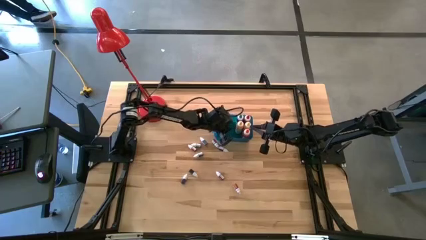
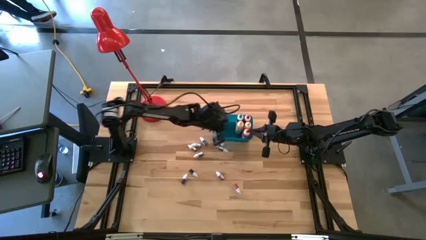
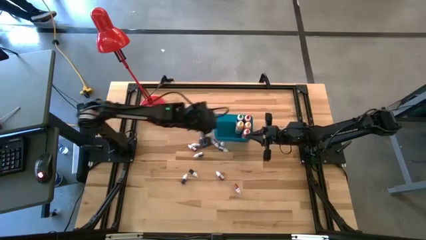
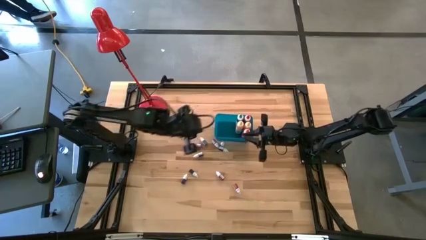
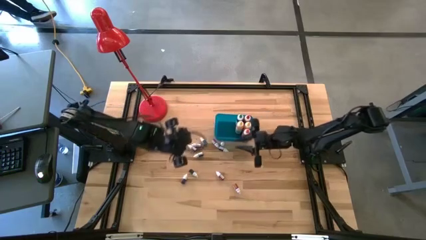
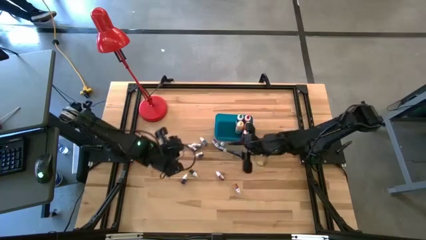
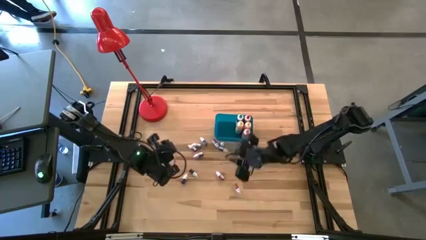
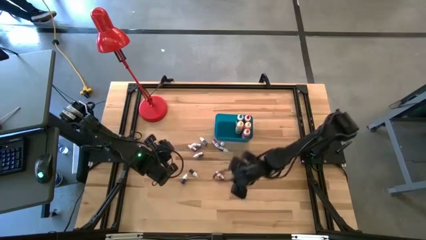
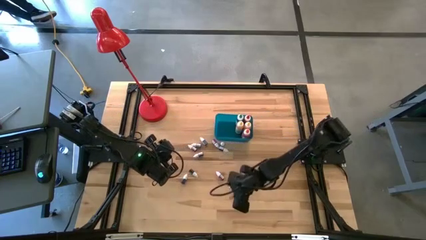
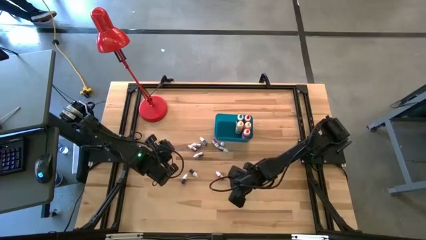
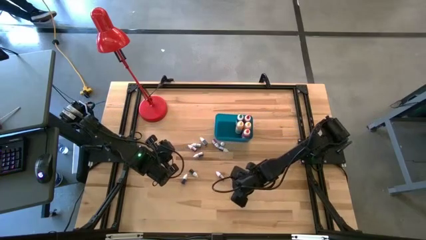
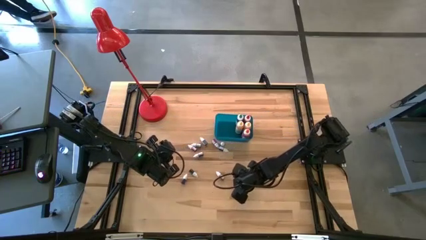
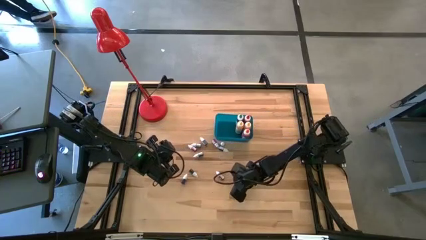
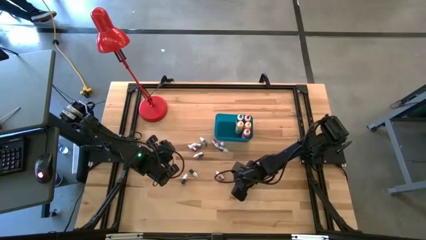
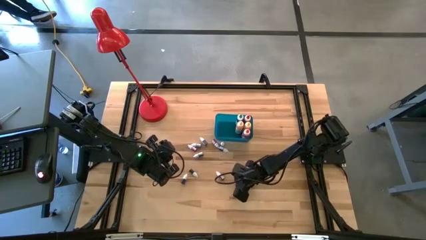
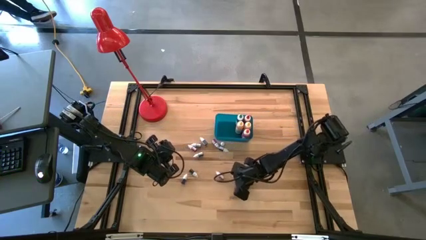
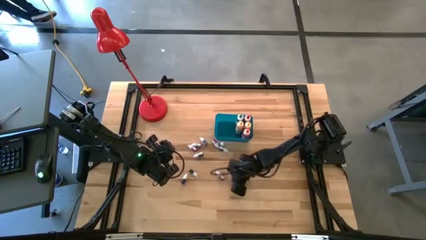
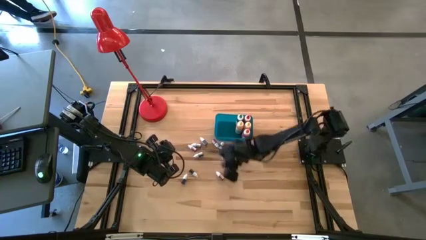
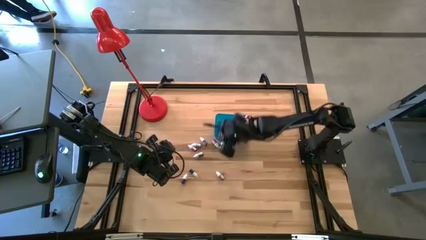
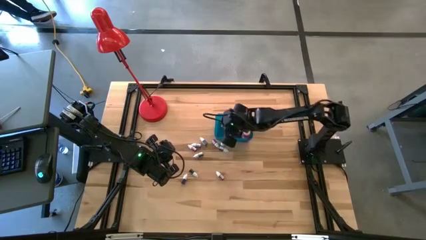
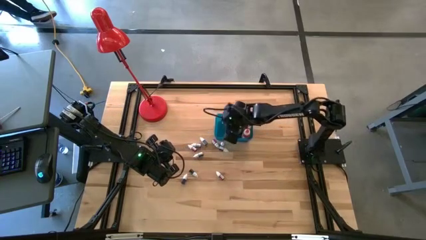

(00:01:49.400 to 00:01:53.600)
Task: Pick & Place food coloring
Put the small orange food coloring bottle into the blue bin

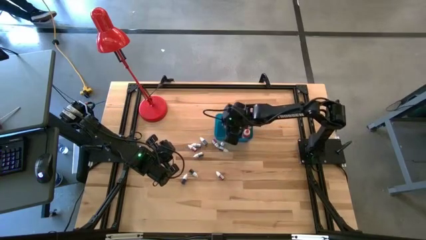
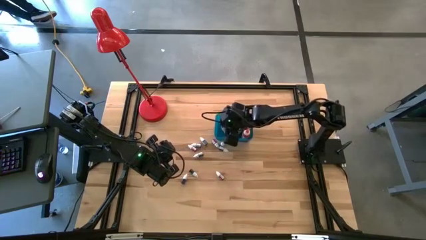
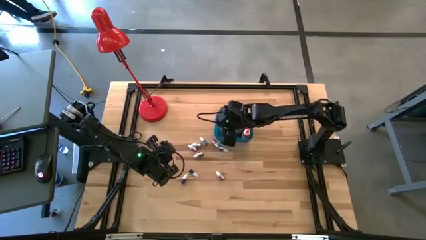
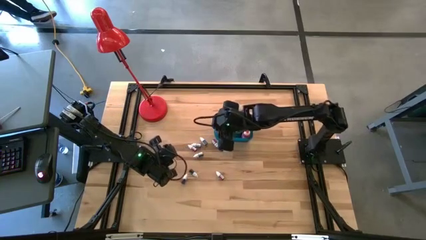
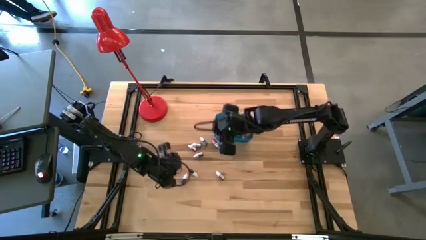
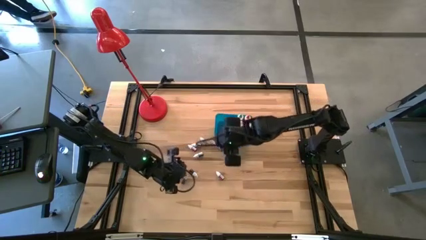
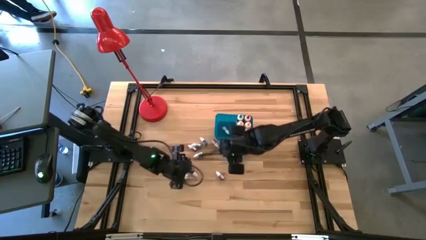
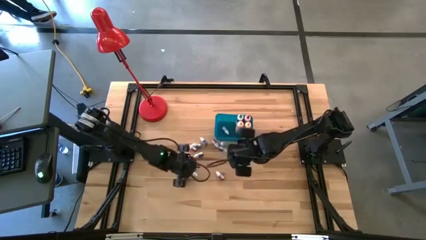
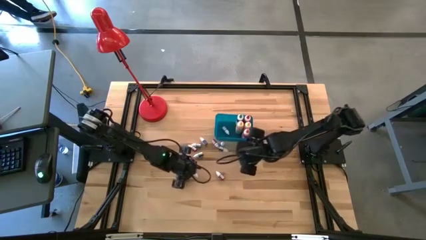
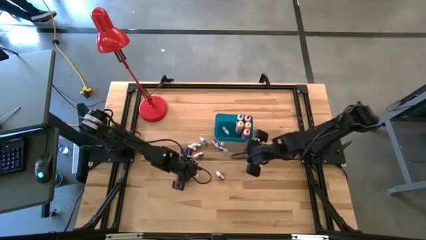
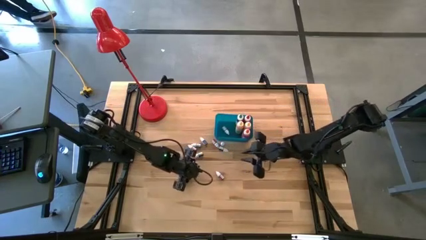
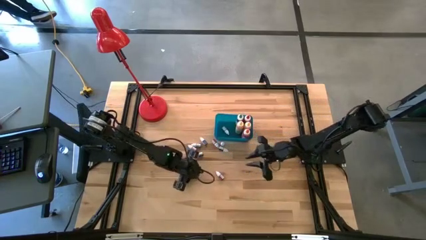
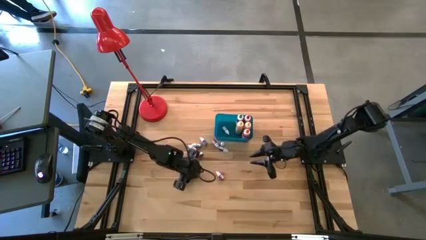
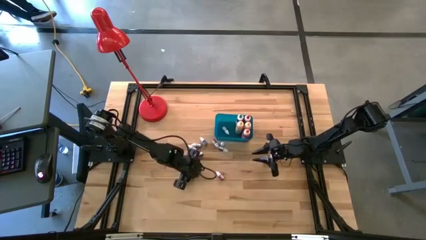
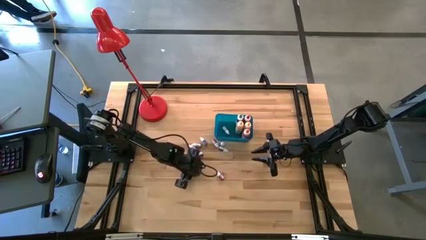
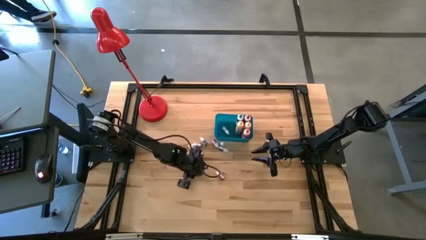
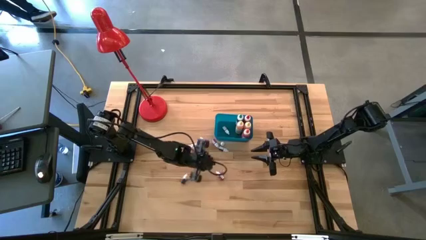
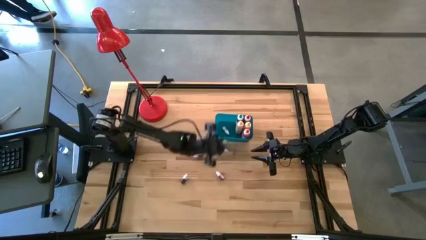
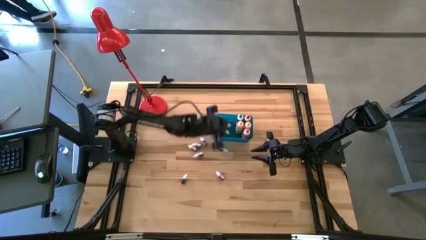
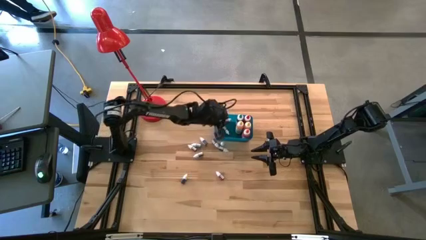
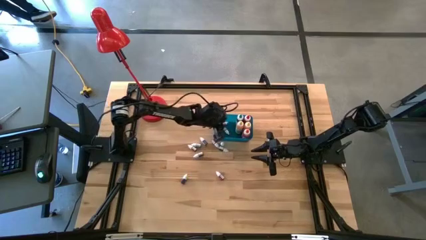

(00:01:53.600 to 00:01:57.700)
Put the bottom small green food coloring bottle into the blue bin

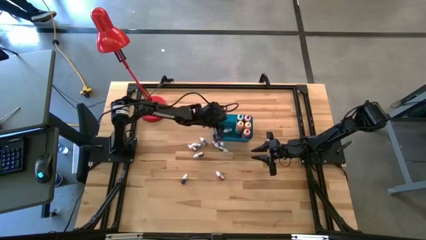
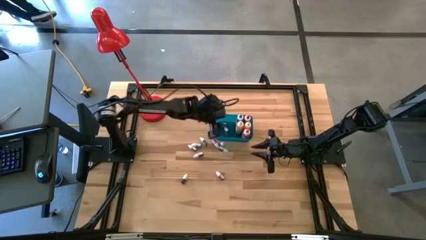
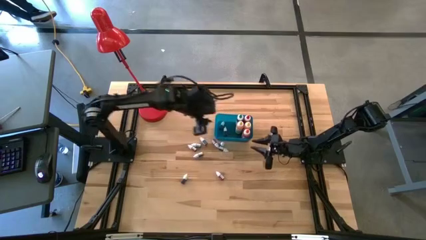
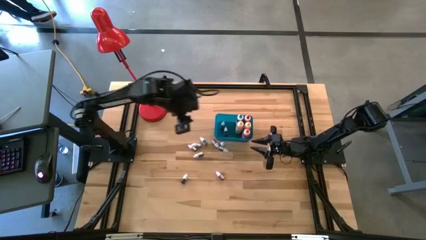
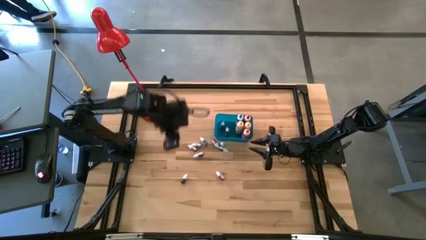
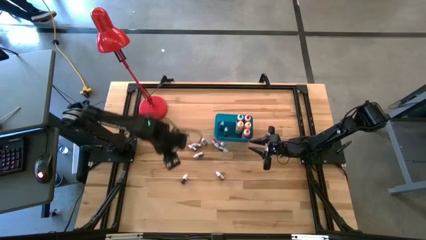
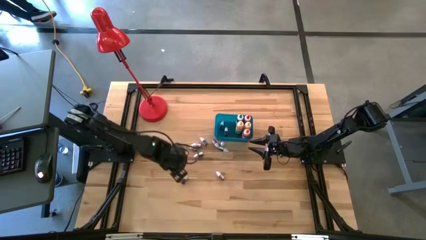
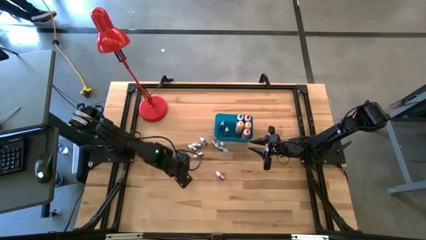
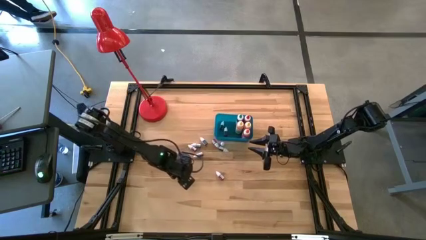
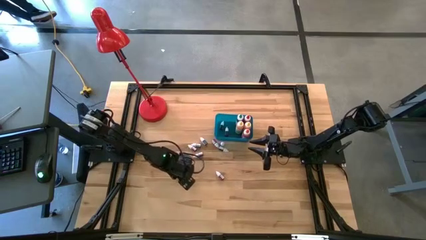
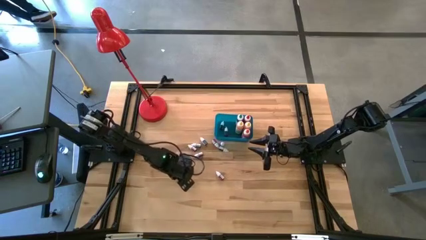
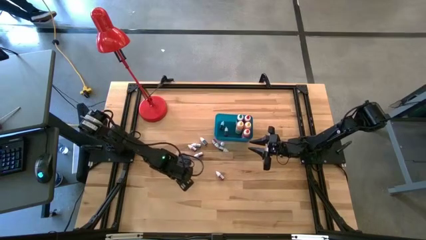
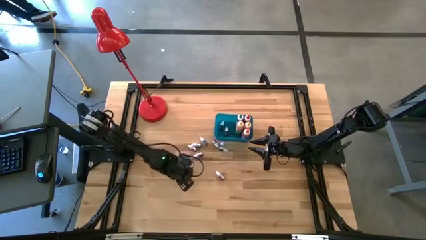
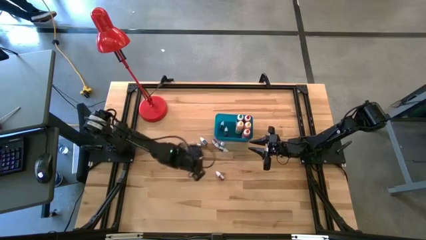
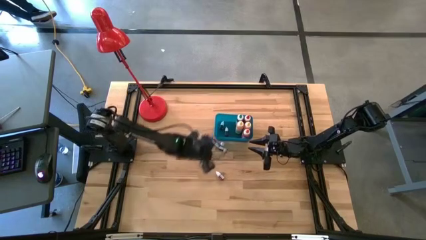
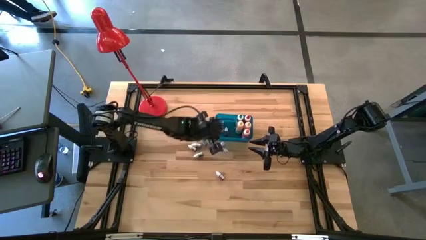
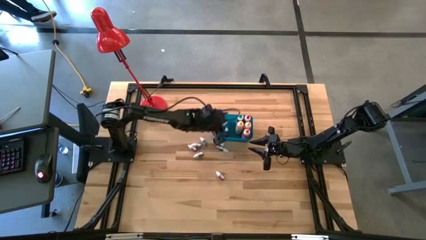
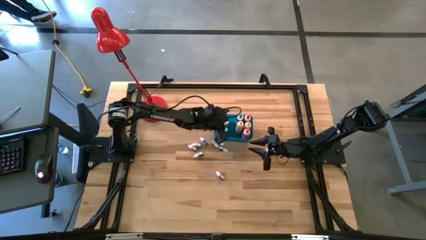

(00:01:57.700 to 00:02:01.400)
Put the bottom small black food coloring bottle into the blue bin

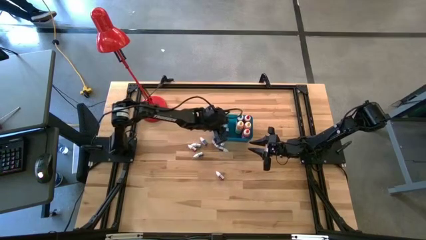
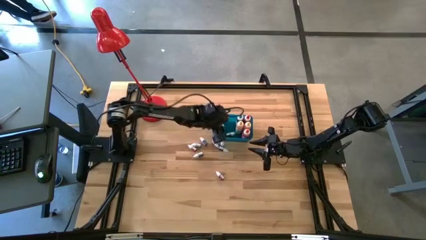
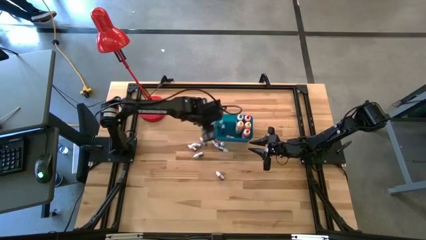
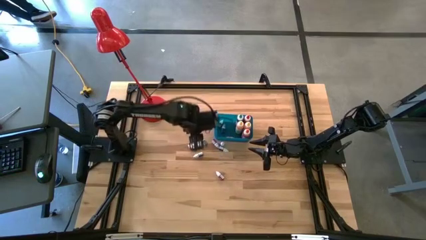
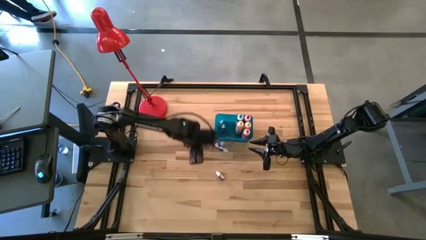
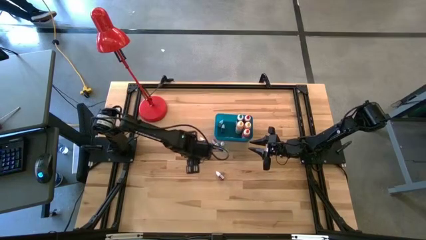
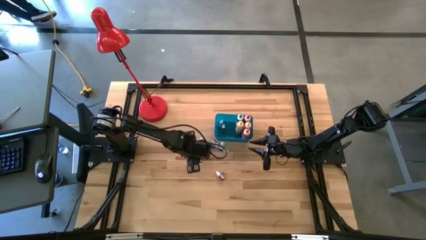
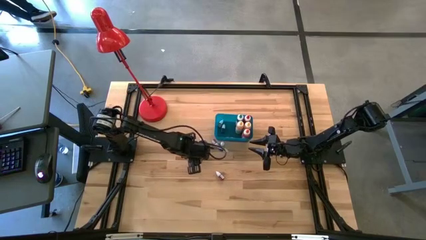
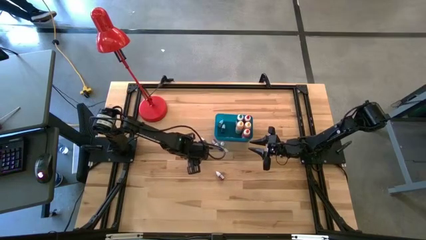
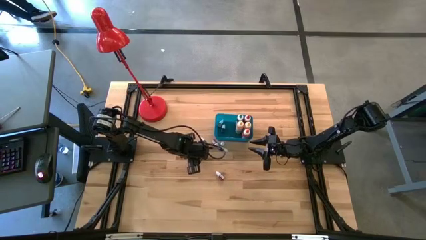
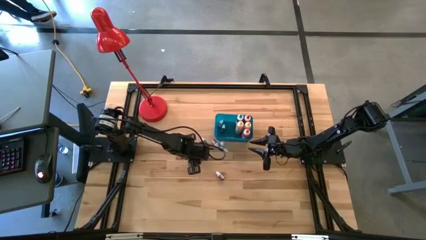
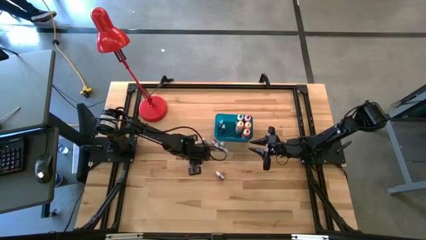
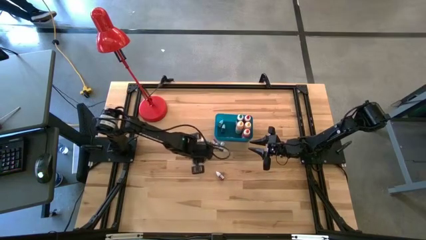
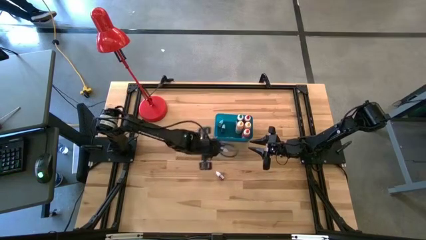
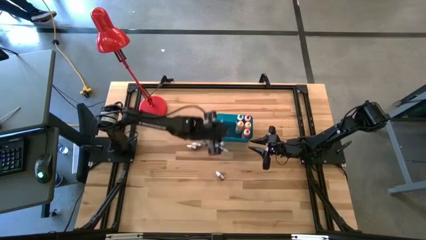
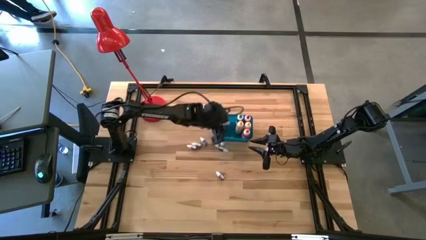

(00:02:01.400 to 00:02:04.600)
Put the small blue food coloring bottle into the blue bin

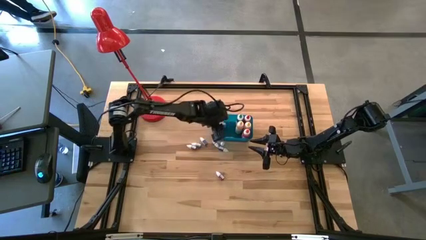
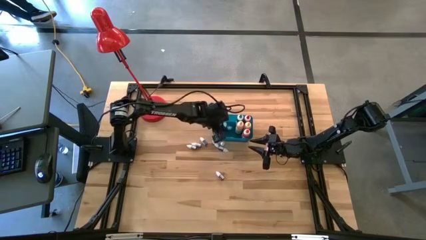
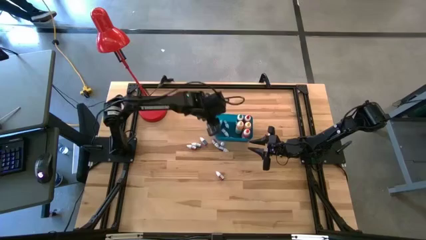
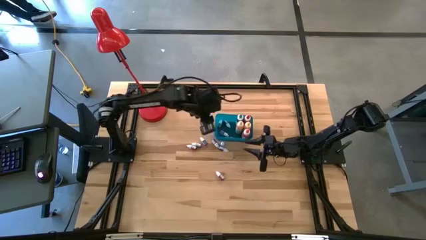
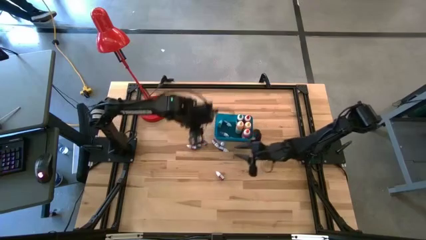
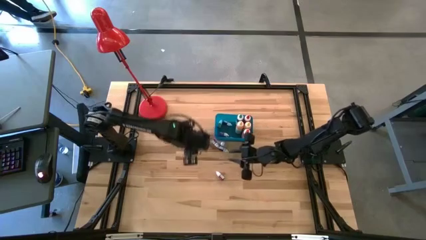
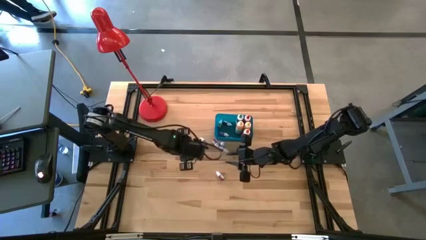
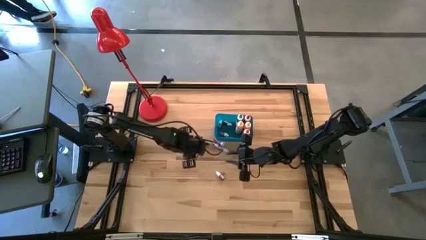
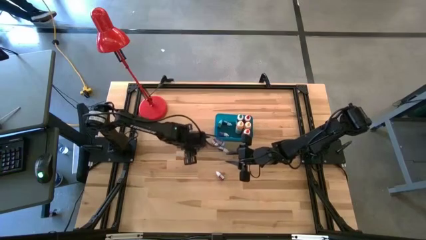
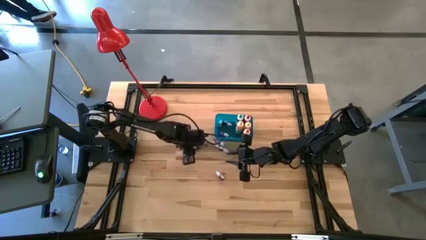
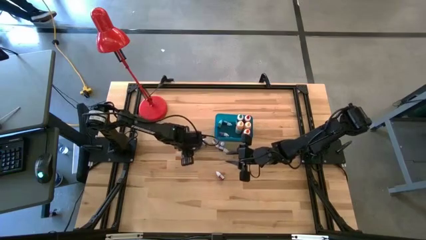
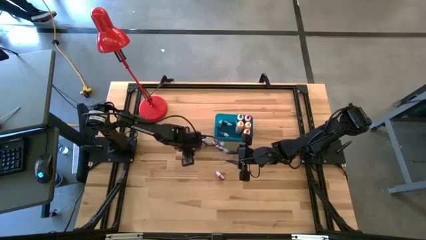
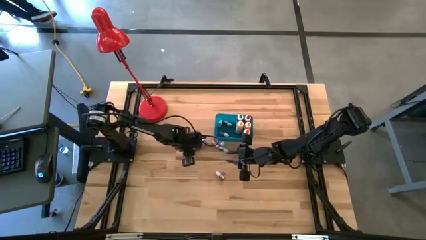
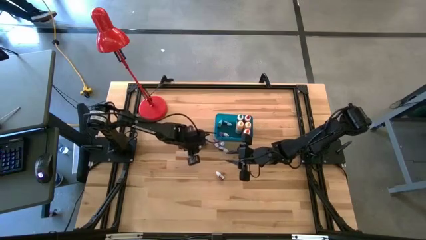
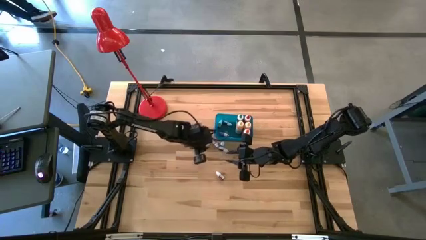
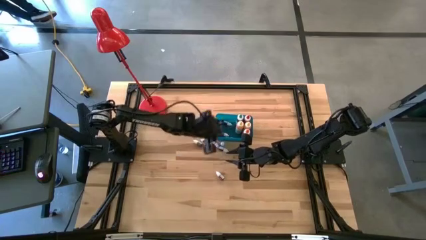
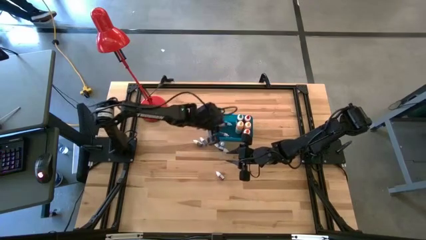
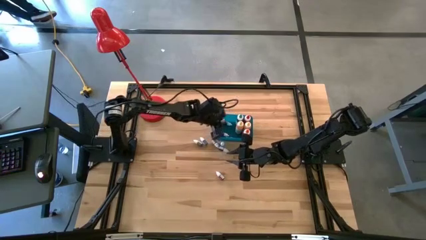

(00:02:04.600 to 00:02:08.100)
Put the top small red food coloring bottle into the blue bin
